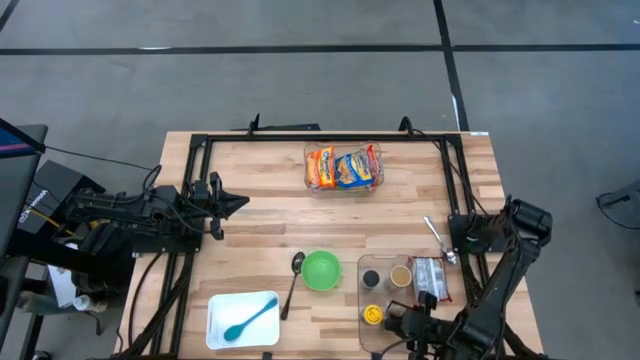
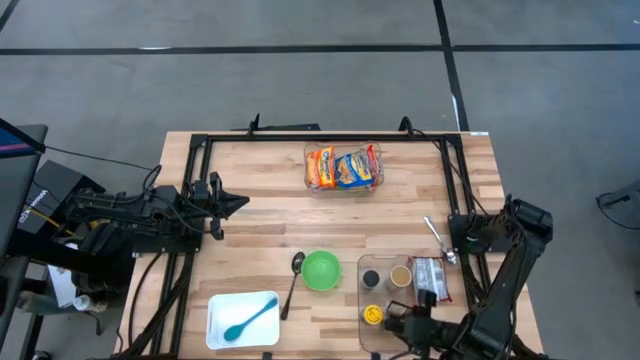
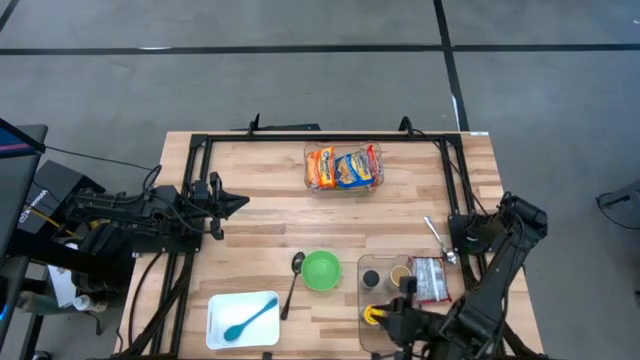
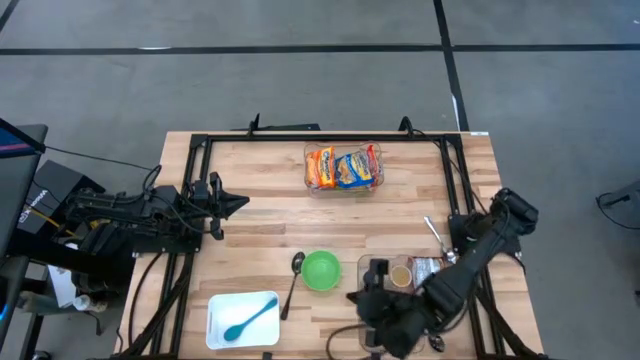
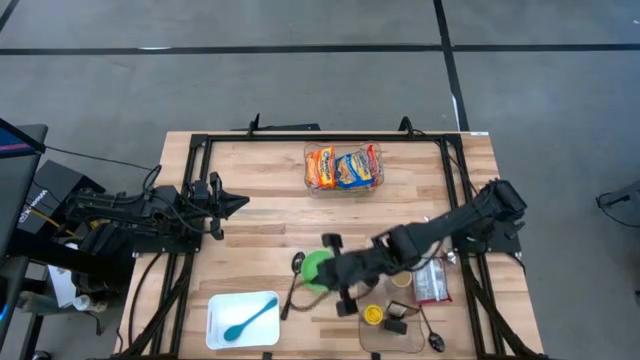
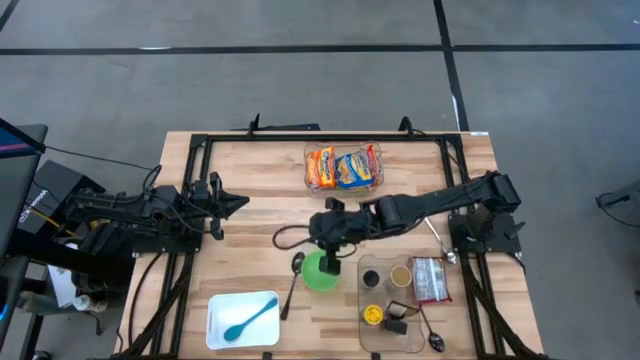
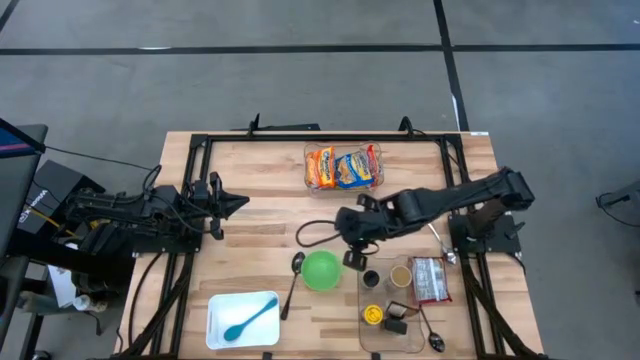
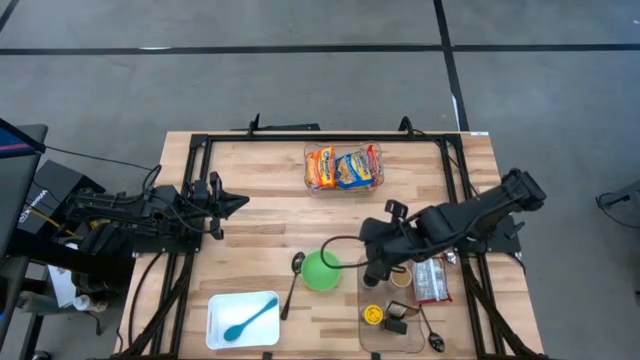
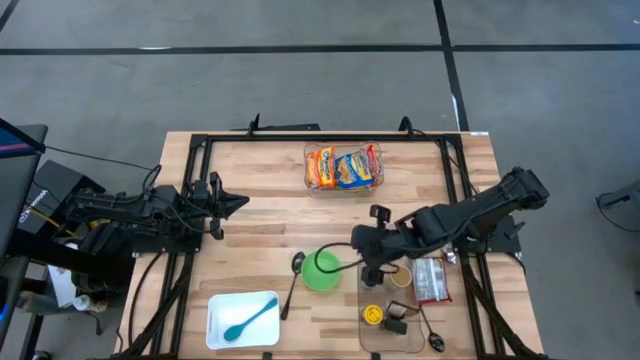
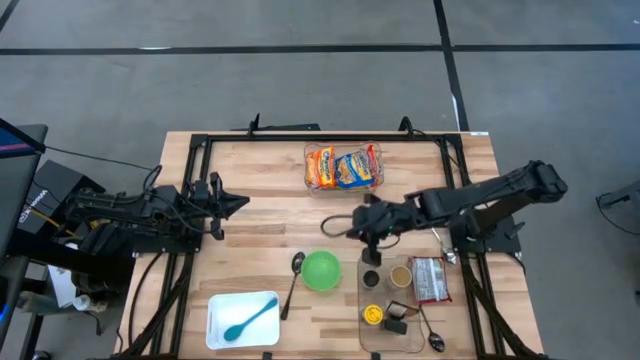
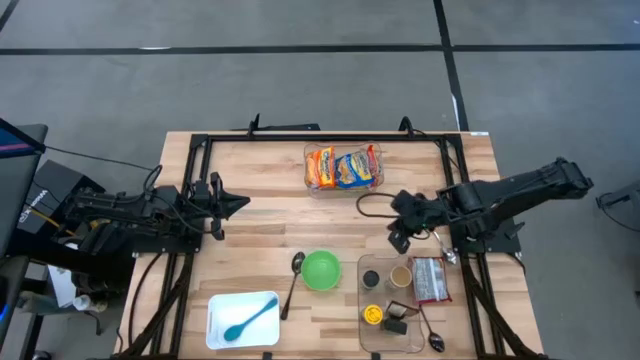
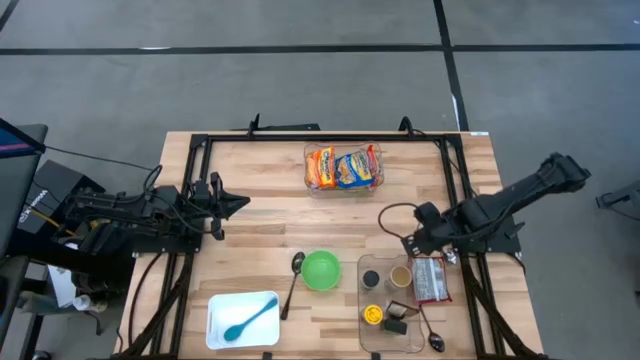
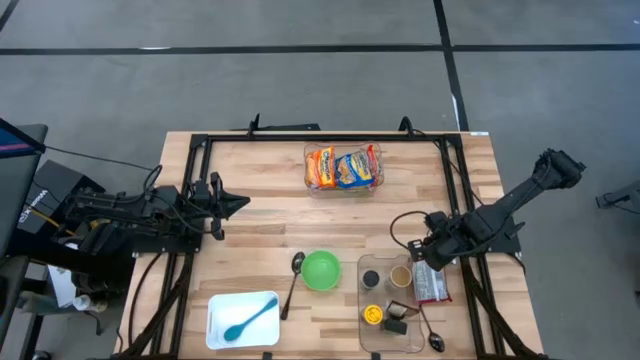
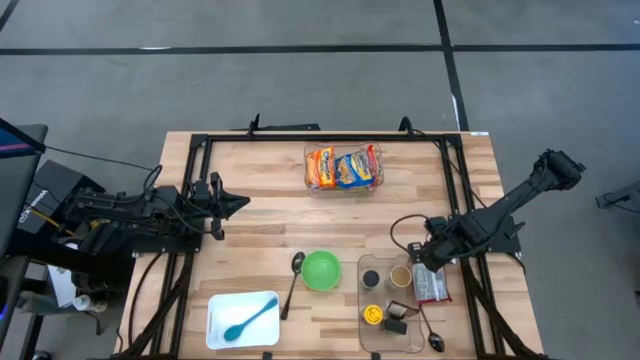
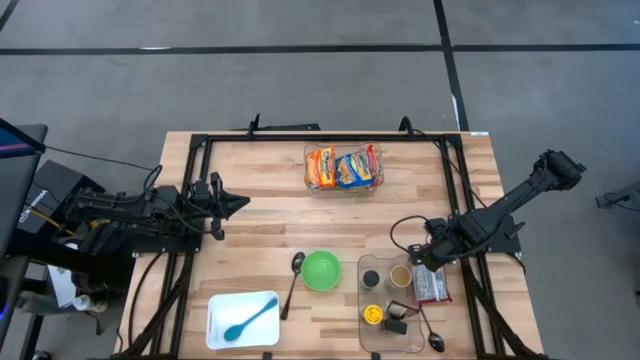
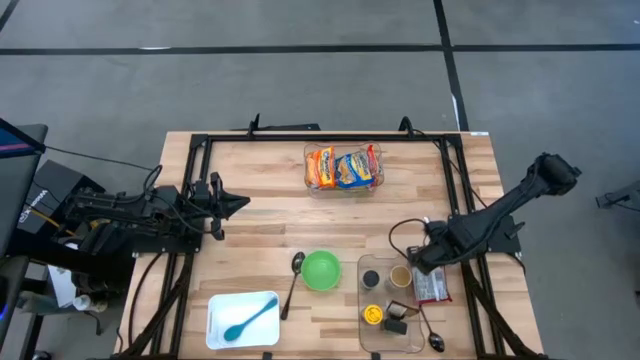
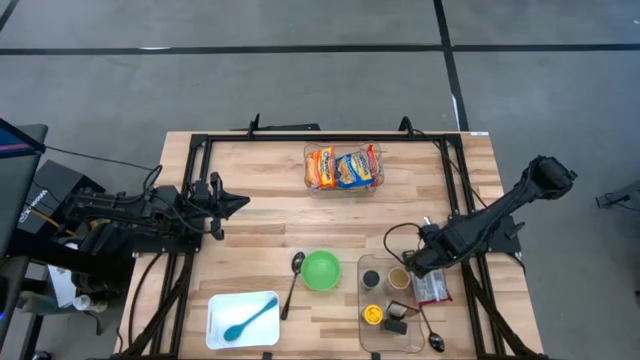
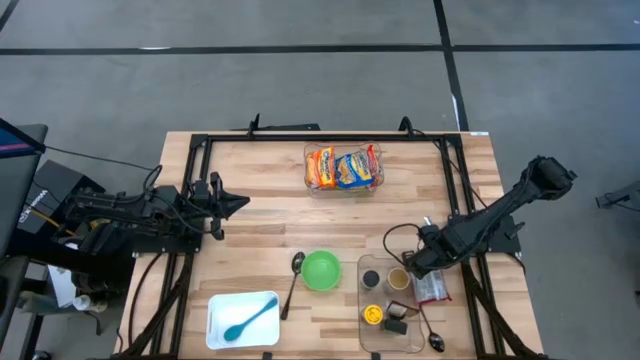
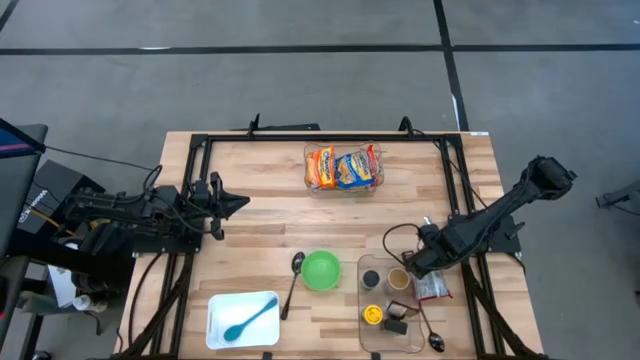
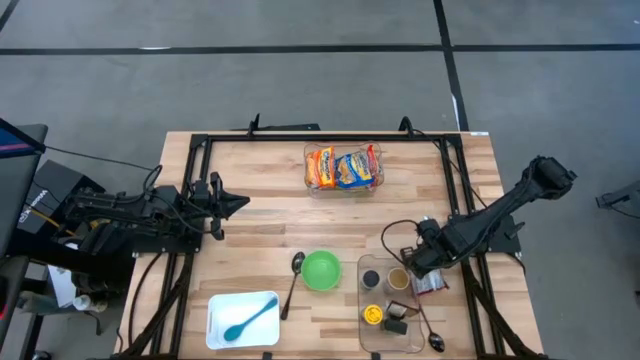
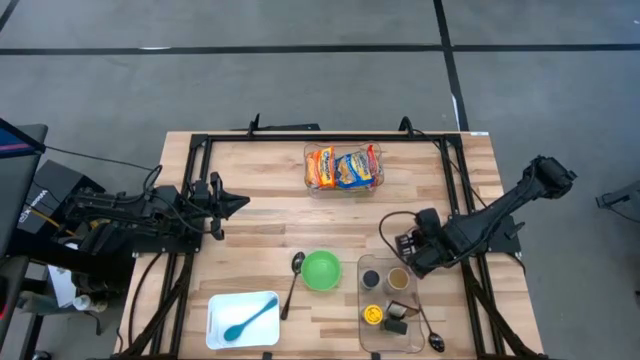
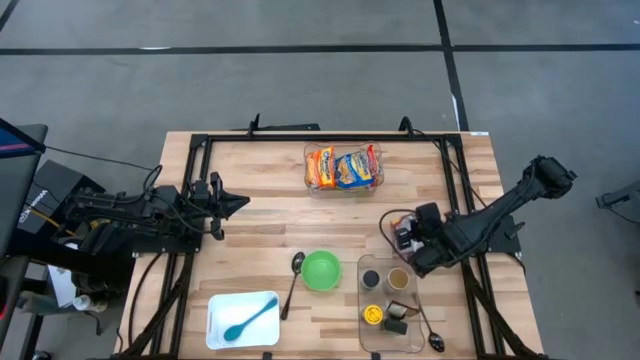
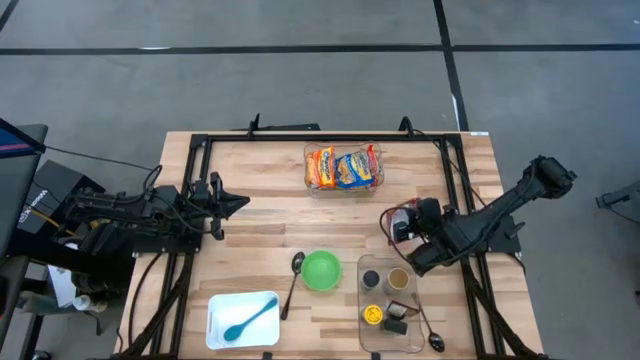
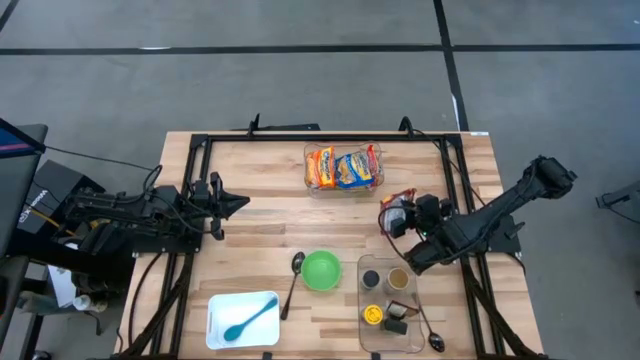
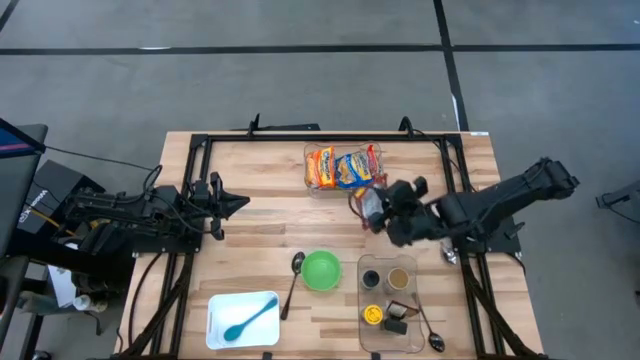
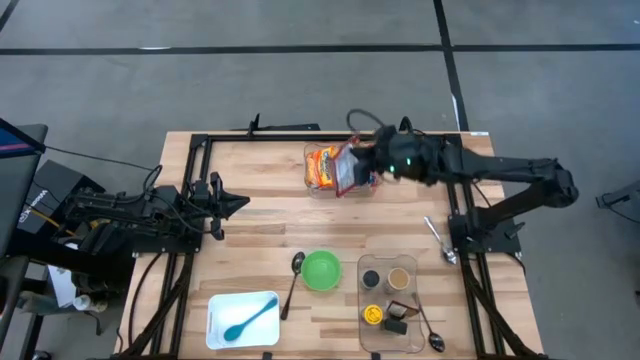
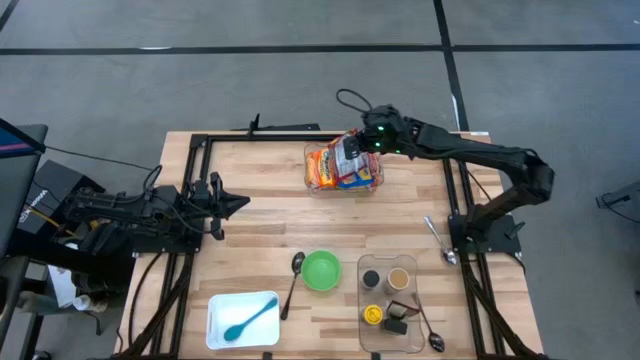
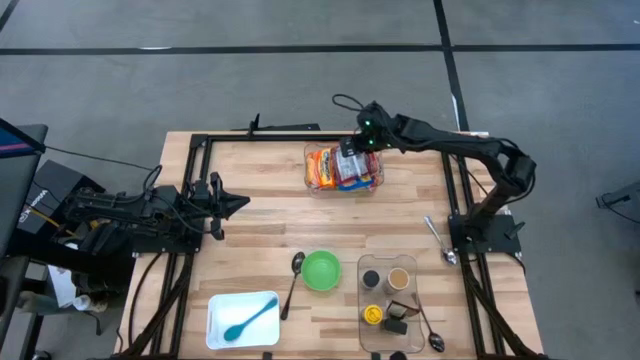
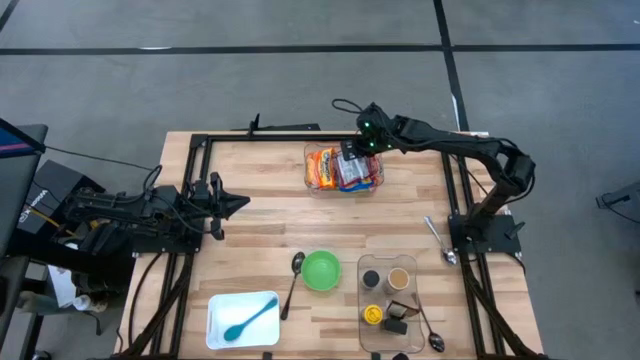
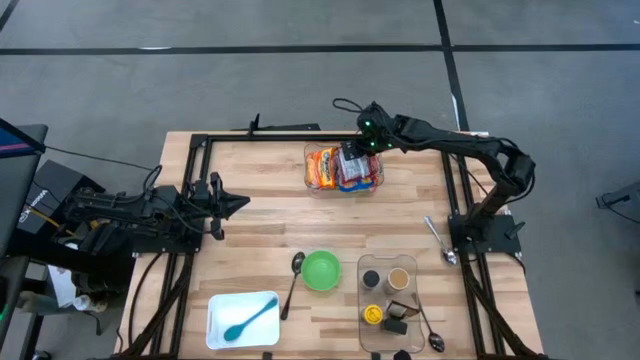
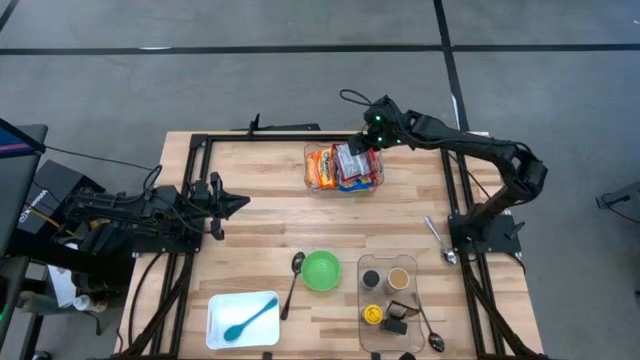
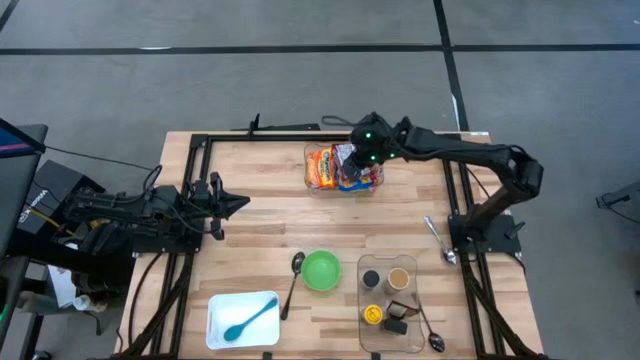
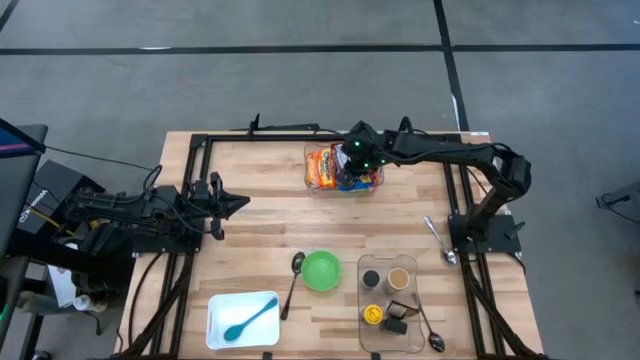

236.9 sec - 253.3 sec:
Task: Pick & Place Food Item
Put the red noodle pack into the top transparent bin

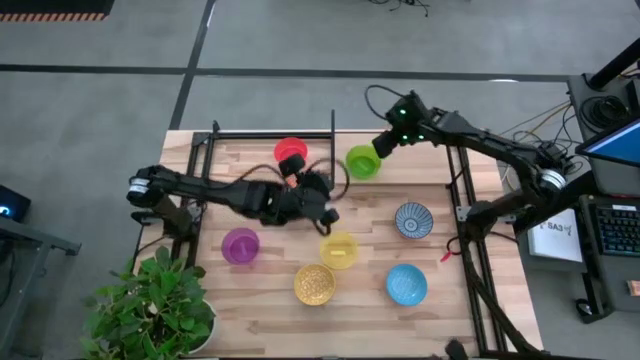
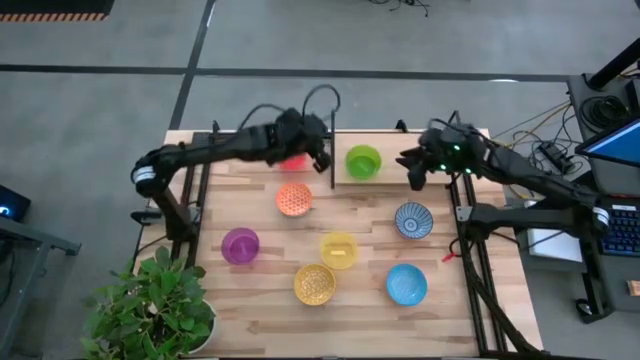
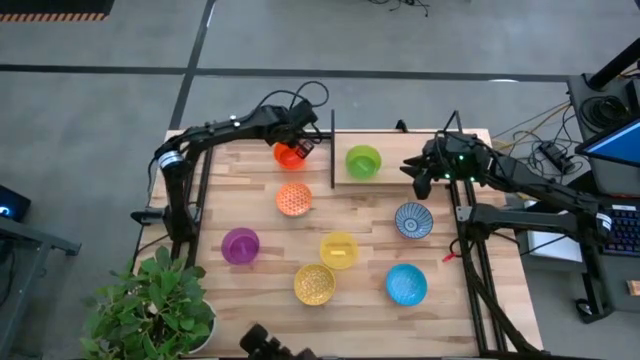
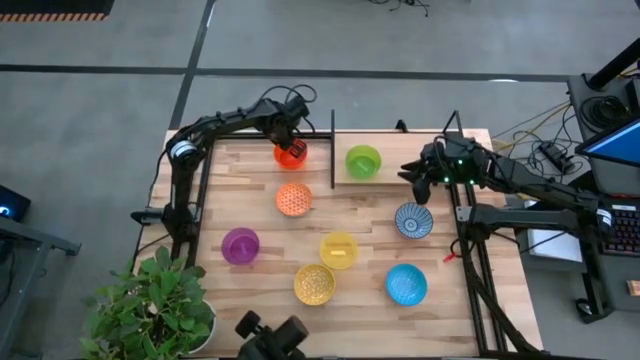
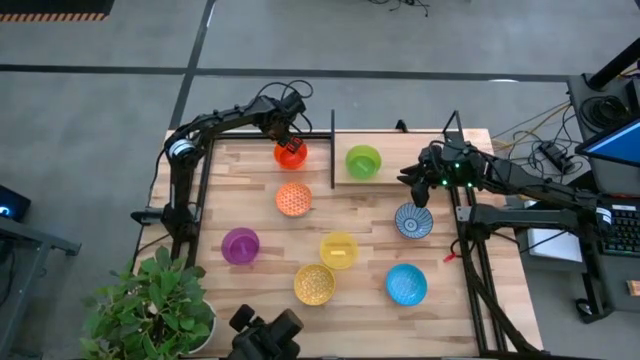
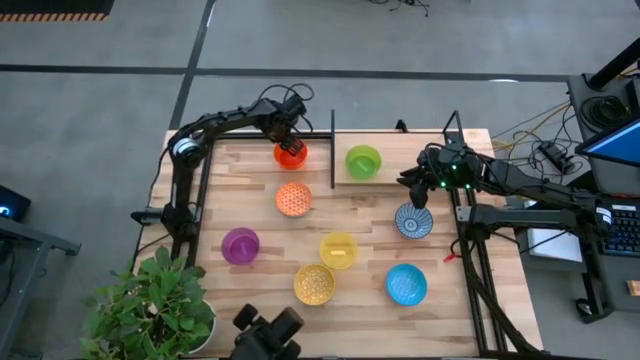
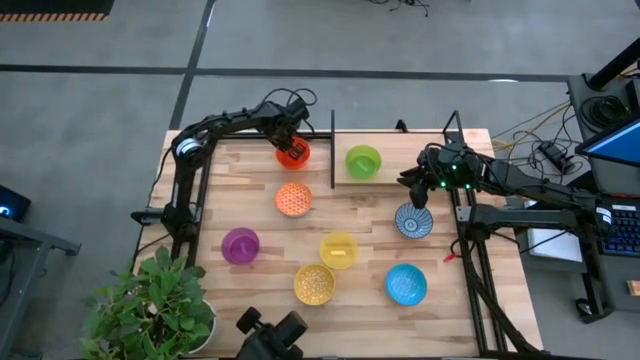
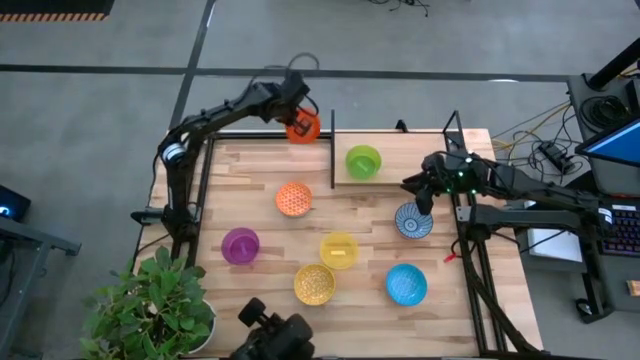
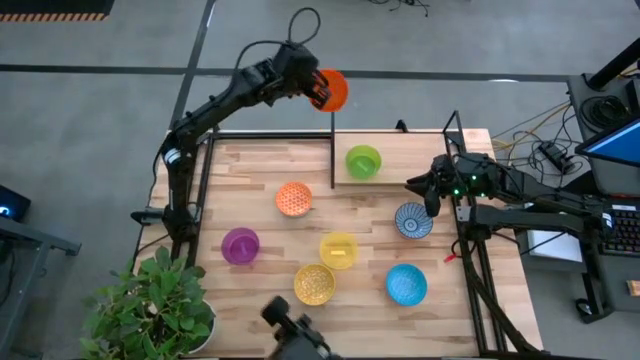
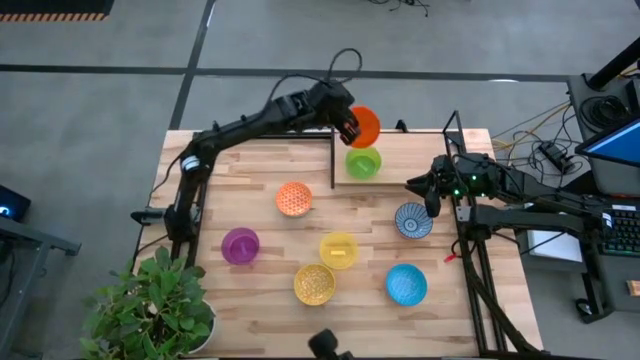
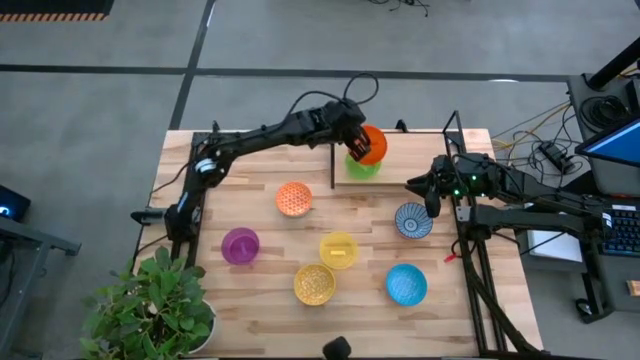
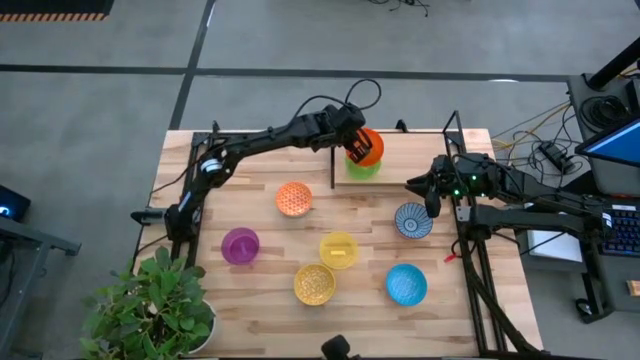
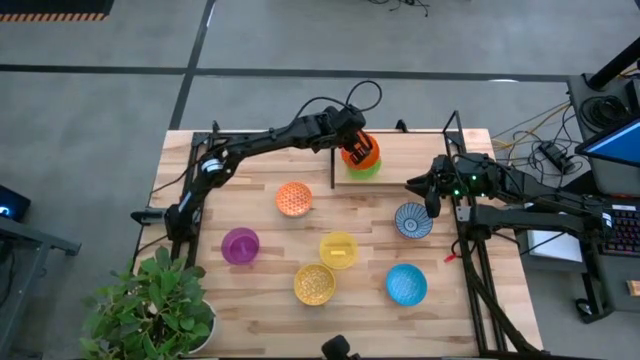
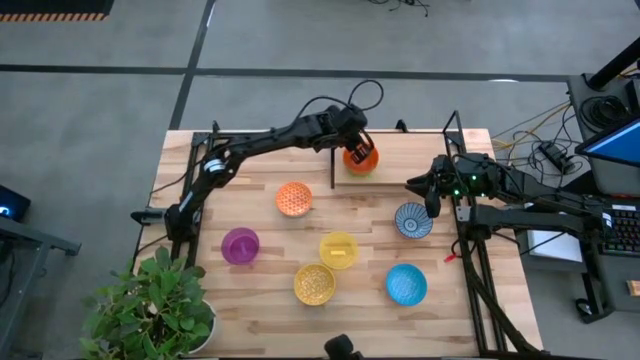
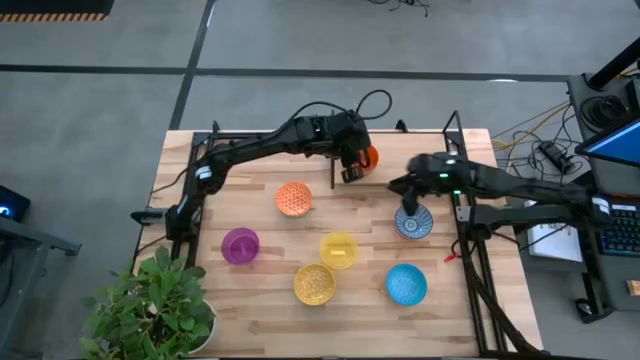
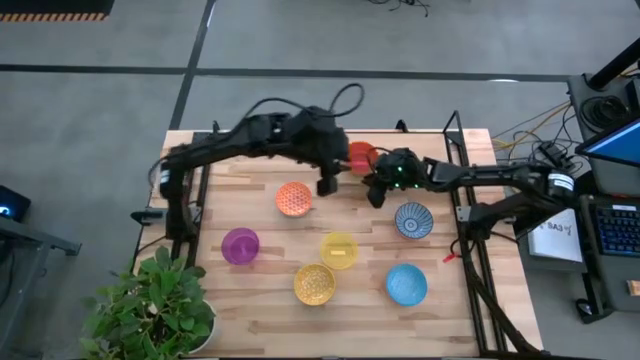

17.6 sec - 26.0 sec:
Task: Place and stack bowls onto a shelf
Stack the orange bowl on top of the green bowl on the shelf
